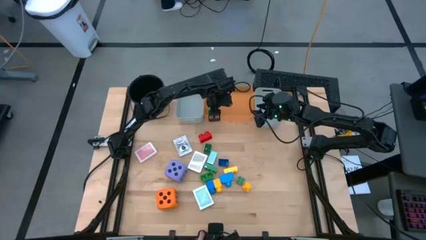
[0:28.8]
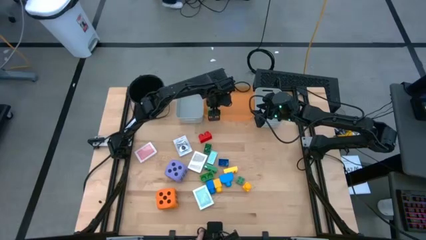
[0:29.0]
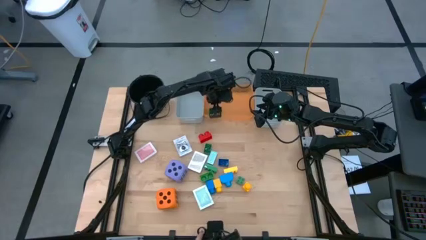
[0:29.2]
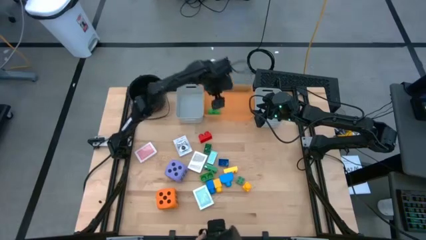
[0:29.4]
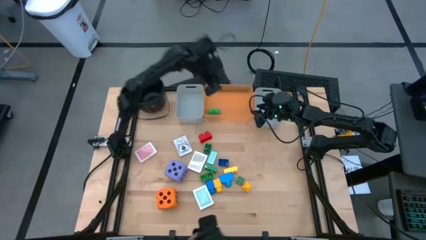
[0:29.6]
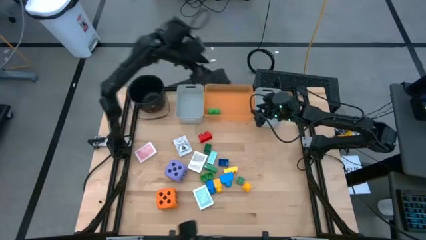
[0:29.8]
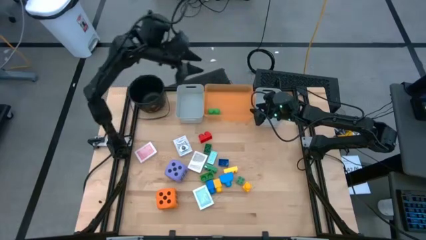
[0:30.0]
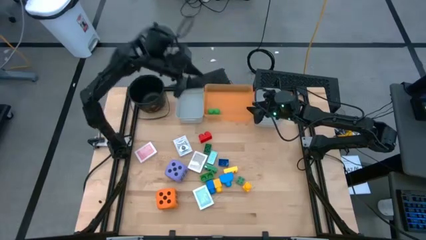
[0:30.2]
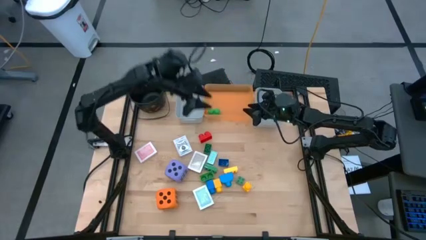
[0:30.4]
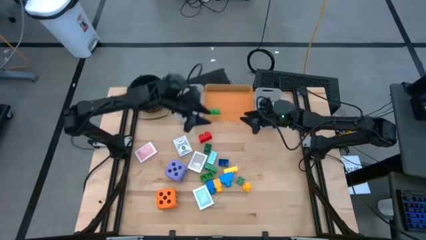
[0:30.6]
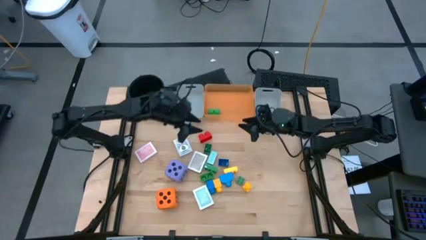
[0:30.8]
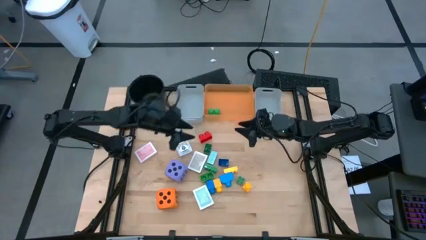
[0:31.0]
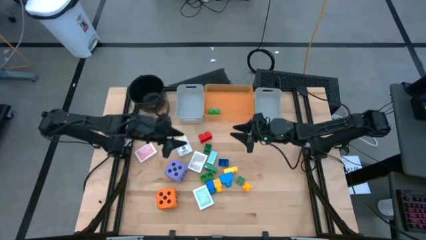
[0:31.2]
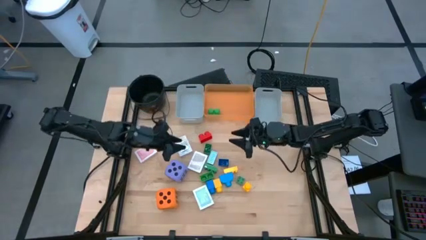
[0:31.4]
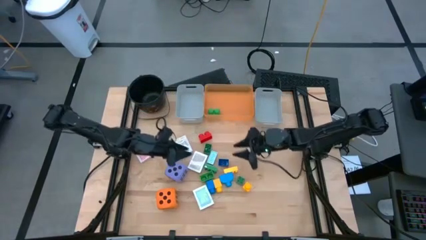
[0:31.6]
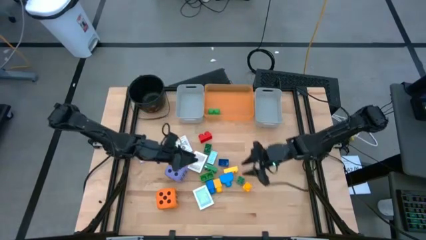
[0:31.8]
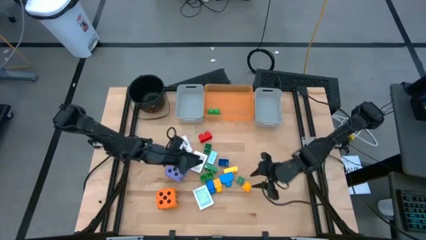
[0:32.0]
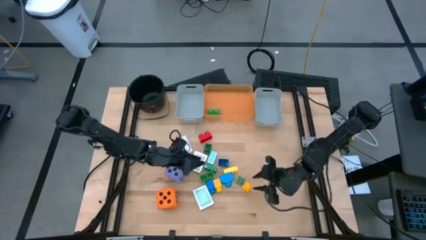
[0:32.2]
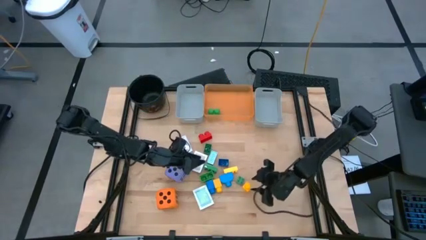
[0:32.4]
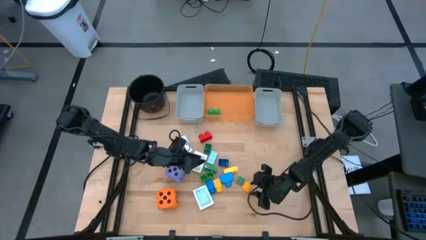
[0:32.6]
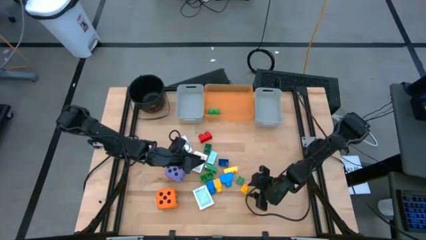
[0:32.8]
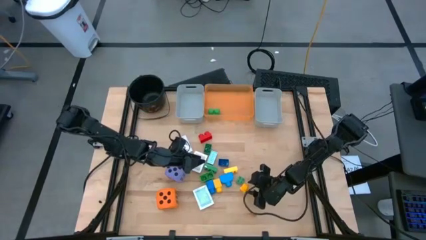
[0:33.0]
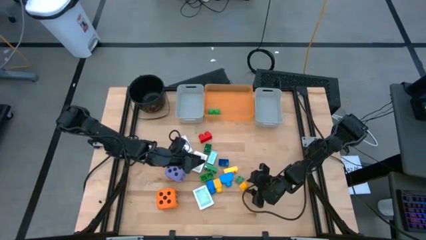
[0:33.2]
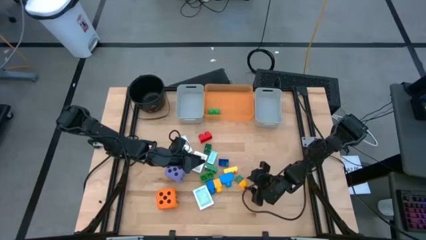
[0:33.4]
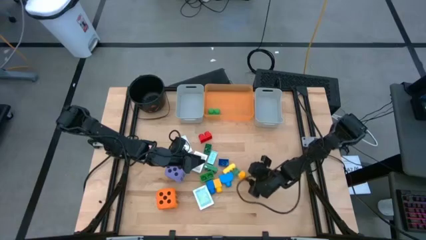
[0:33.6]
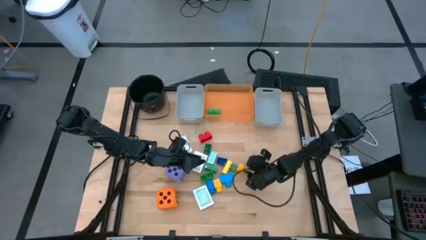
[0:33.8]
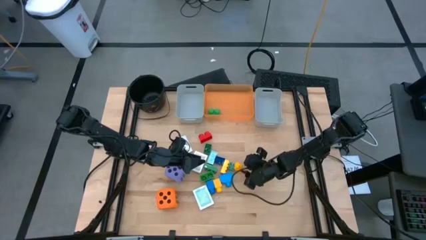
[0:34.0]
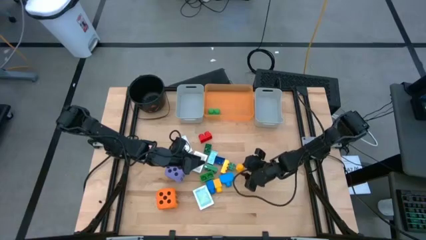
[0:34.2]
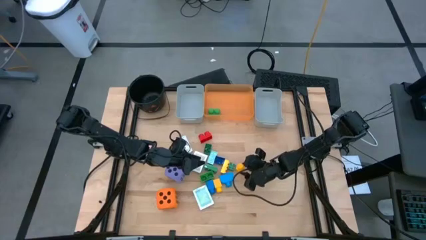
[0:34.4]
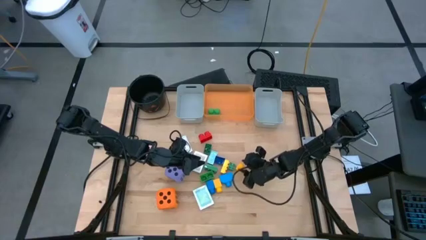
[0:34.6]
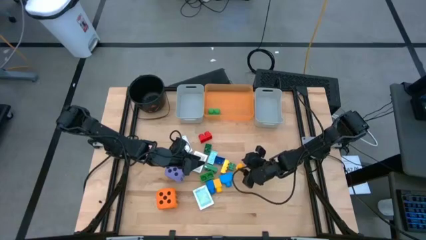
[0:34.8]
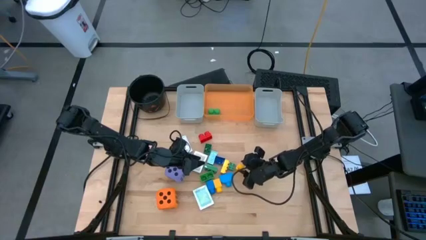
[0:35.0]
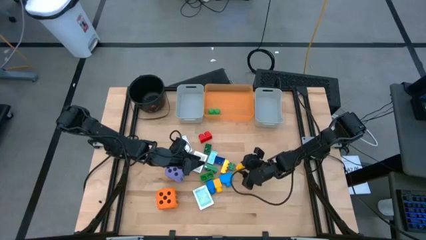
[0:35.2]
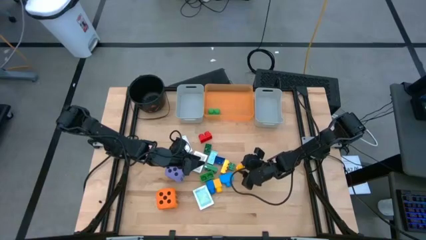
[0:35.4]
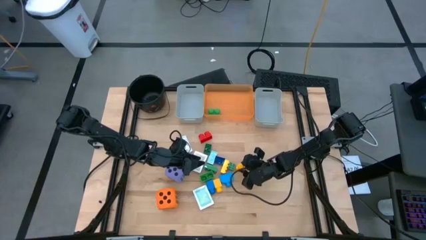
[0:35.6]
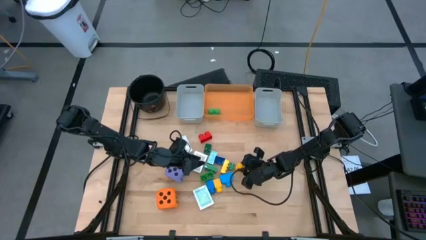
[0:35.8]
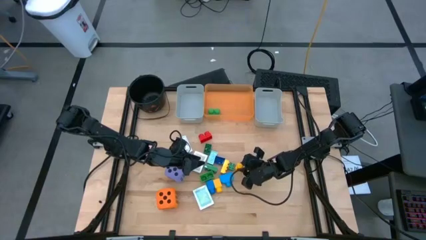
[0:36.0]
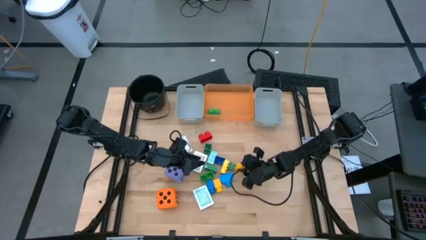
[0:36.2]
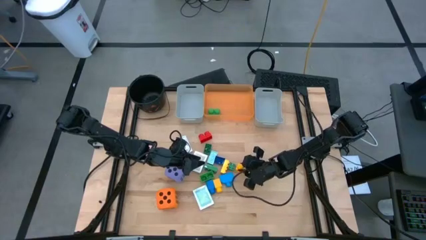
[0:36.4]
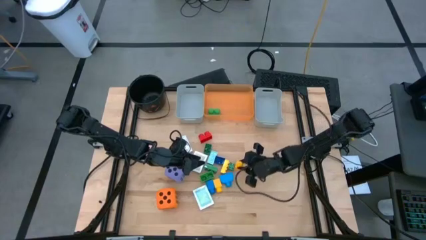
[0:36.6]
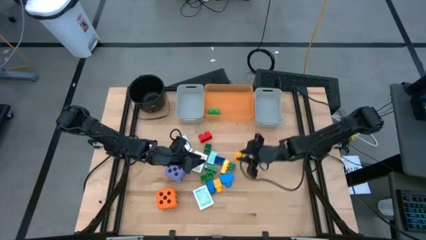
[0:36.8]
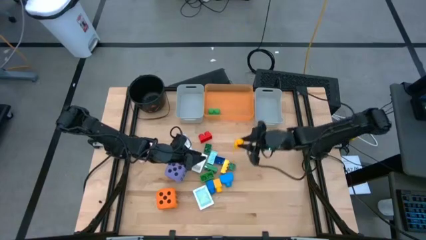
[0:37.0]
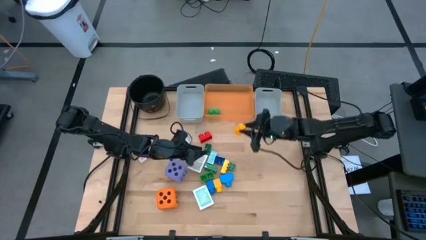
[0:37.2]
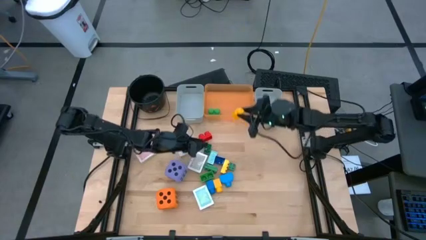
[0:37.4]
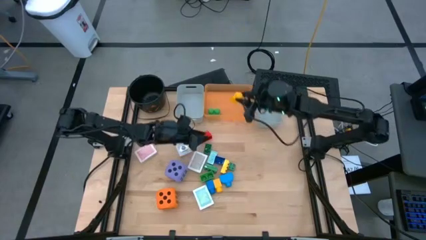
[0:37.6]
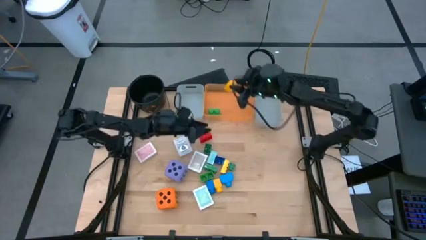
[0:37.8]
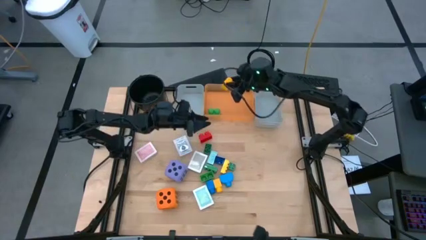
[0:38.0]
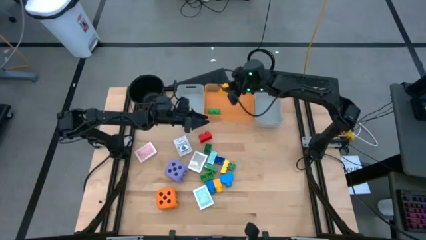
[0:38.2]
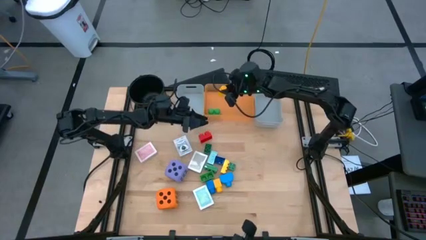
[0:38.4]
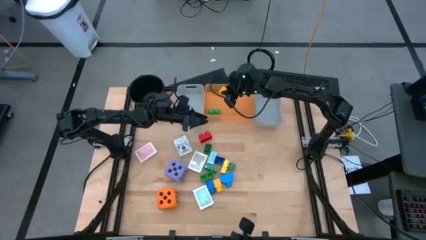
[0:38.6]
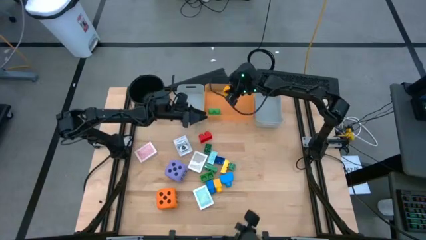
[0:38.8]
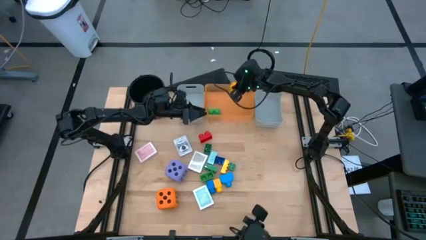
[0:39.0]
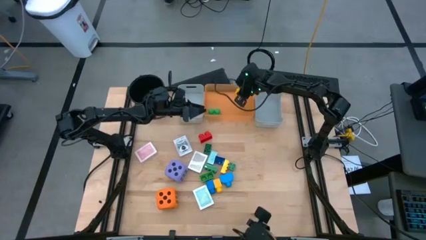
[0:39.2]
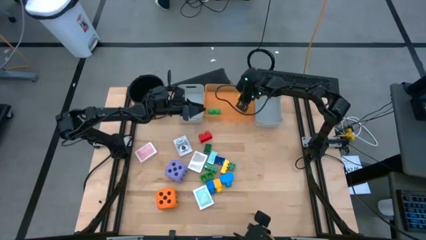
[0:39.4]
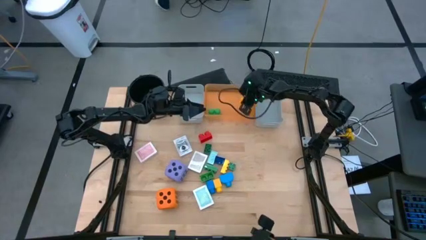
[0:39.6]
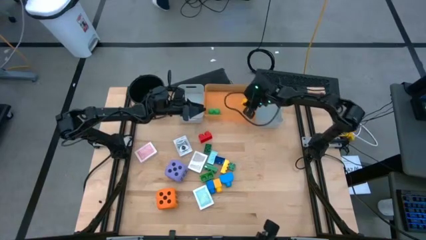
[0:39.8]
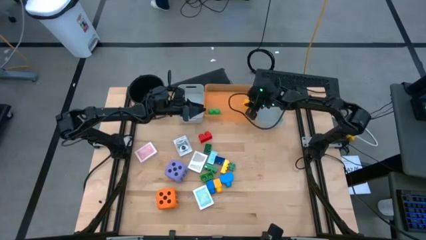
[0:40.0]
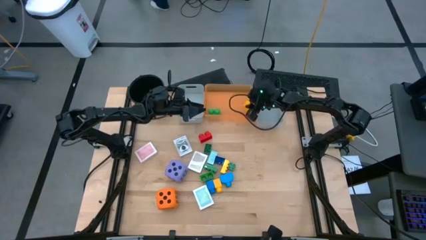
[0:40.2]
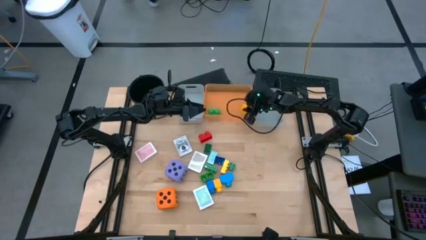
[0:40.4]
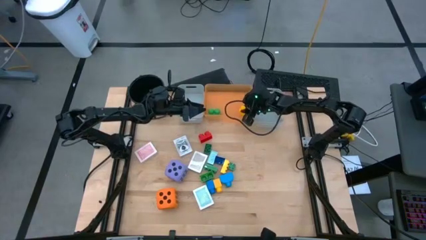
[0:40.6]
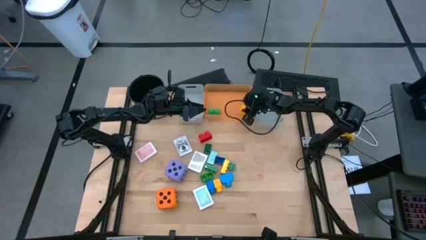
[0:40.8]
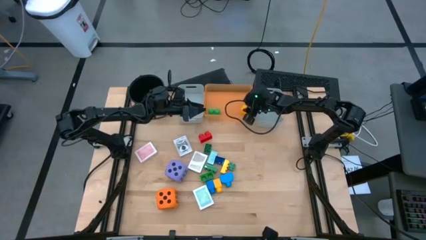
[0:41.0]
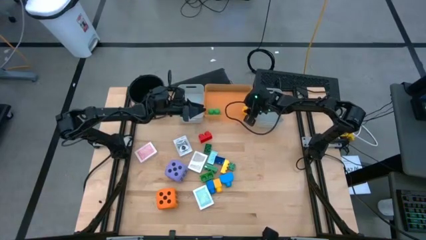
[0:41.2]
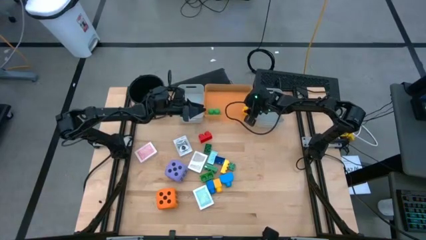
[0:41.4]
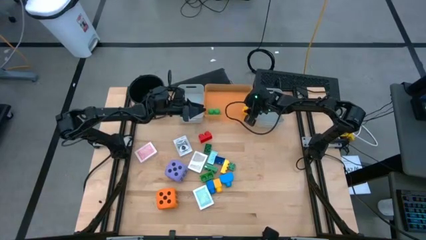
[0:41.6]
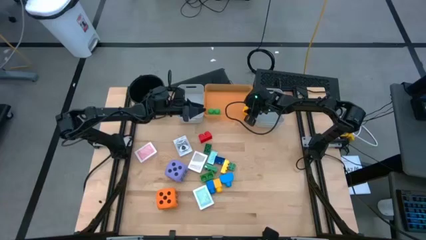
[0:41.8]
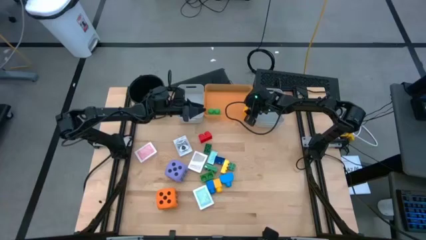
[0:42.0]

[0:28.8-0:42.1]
Task: Pick & Place Toys
Put the bottom left yellow game piece into the orange bin
